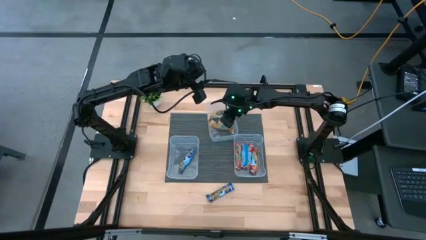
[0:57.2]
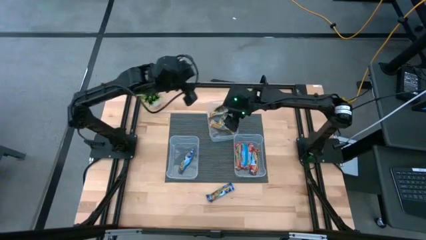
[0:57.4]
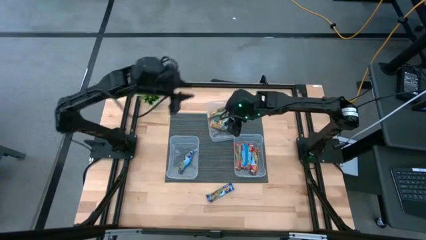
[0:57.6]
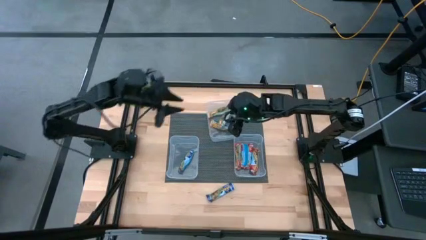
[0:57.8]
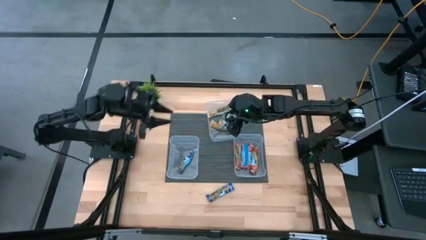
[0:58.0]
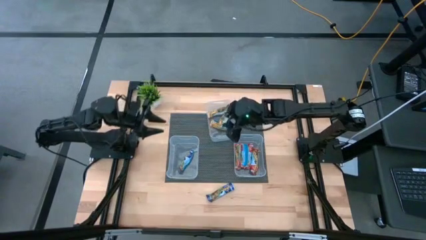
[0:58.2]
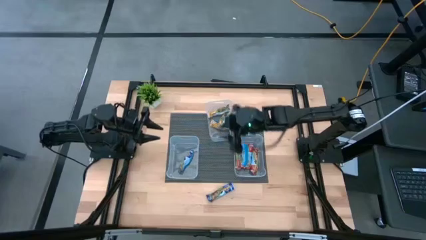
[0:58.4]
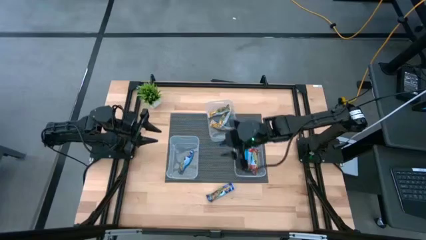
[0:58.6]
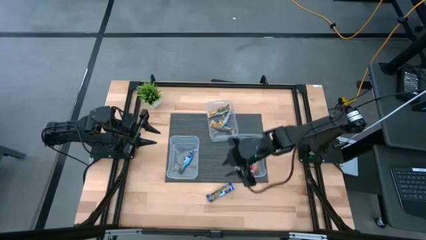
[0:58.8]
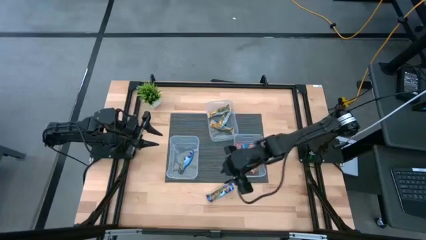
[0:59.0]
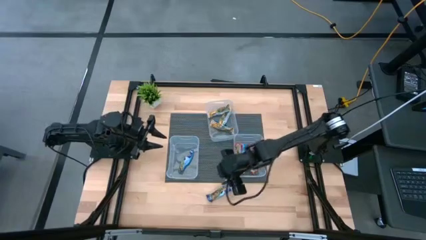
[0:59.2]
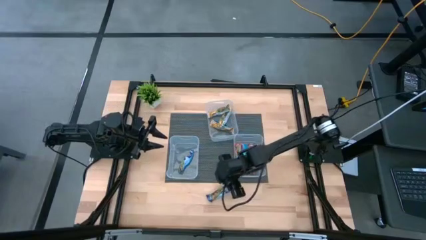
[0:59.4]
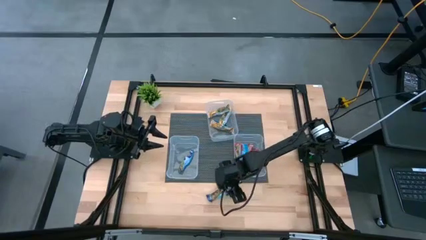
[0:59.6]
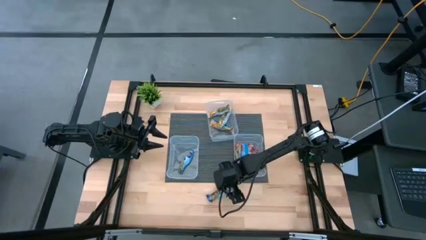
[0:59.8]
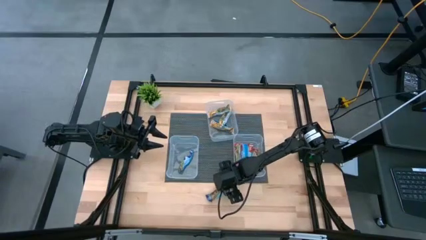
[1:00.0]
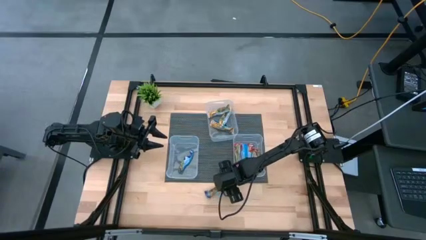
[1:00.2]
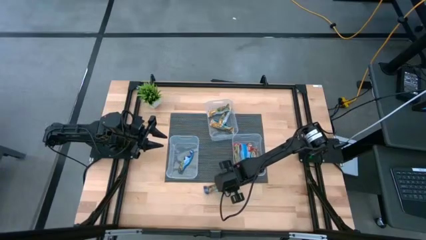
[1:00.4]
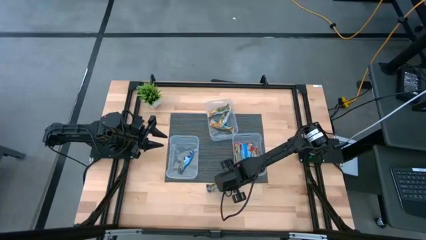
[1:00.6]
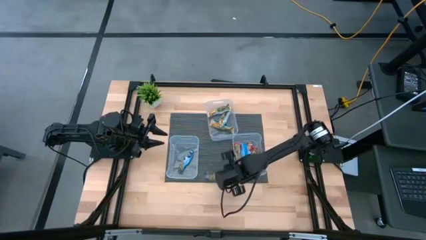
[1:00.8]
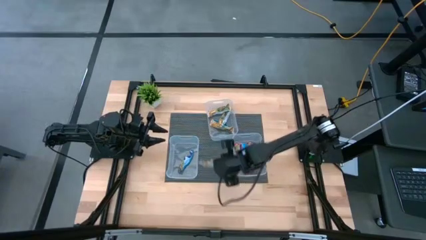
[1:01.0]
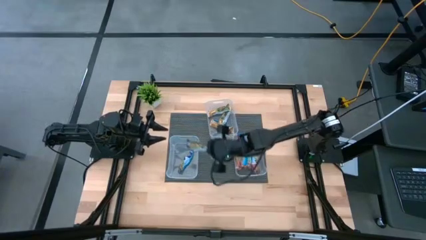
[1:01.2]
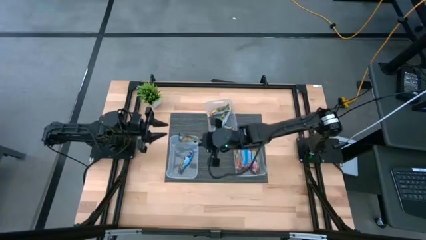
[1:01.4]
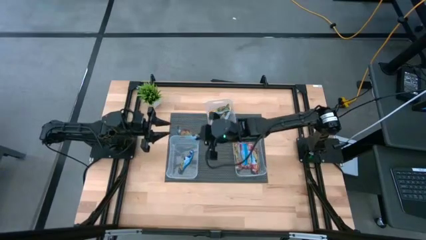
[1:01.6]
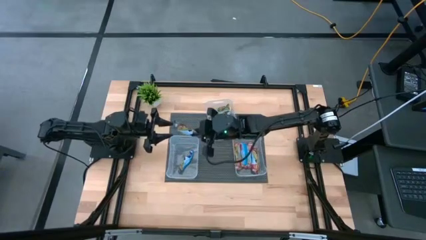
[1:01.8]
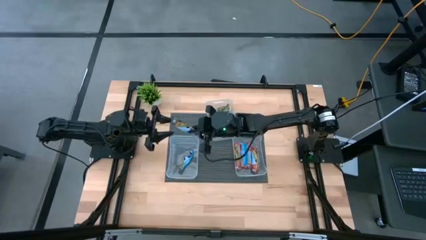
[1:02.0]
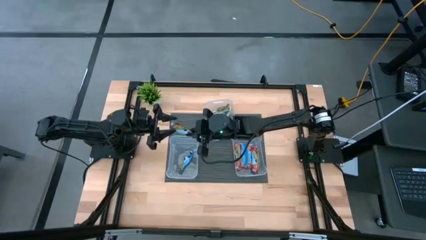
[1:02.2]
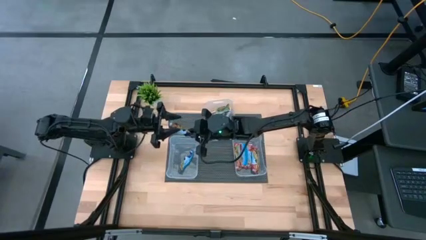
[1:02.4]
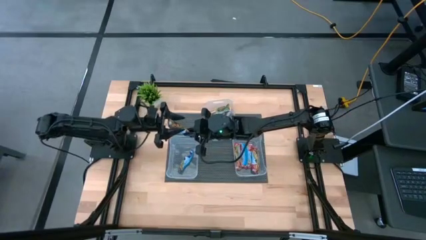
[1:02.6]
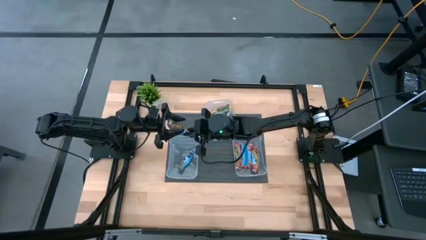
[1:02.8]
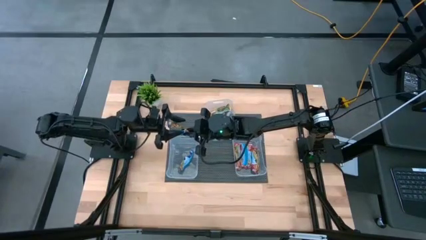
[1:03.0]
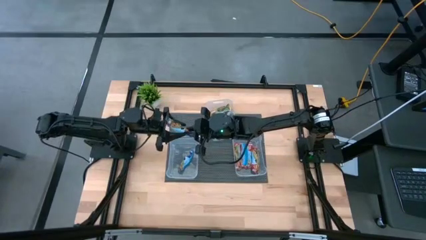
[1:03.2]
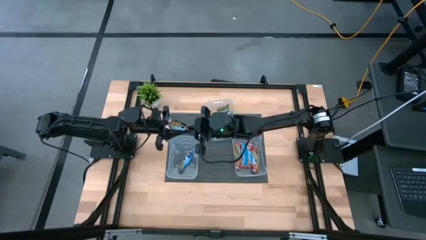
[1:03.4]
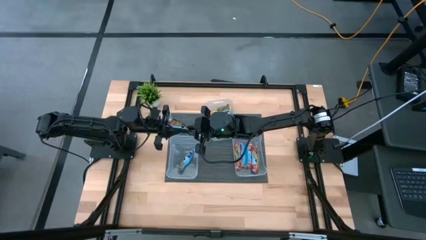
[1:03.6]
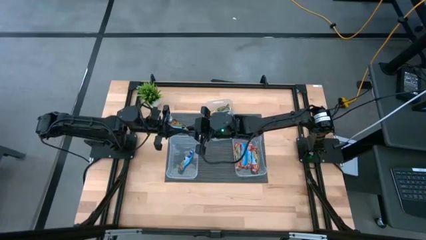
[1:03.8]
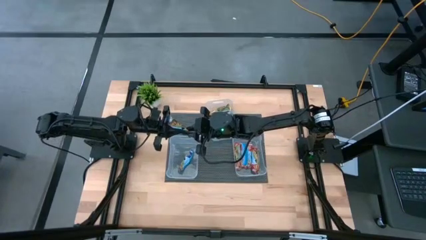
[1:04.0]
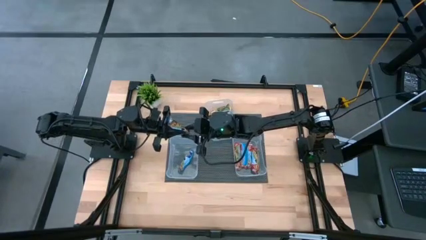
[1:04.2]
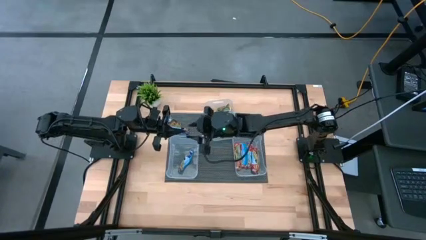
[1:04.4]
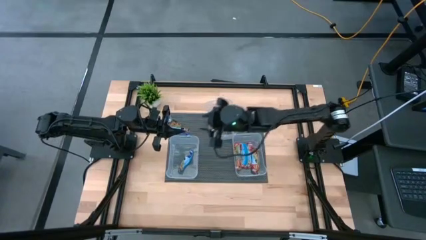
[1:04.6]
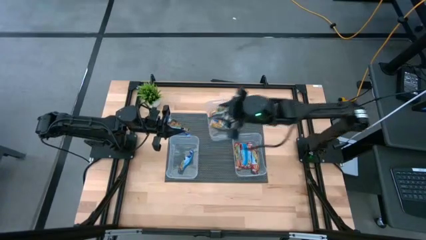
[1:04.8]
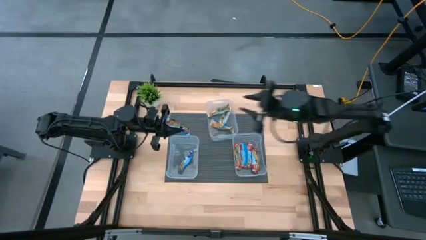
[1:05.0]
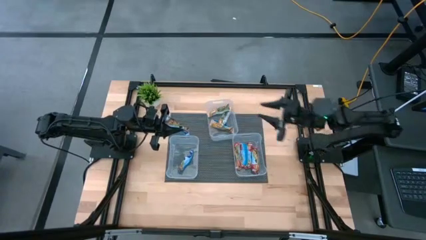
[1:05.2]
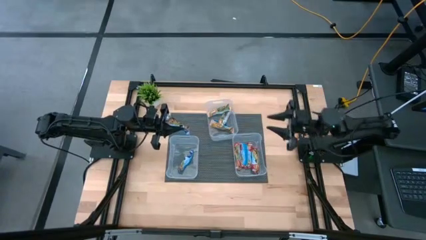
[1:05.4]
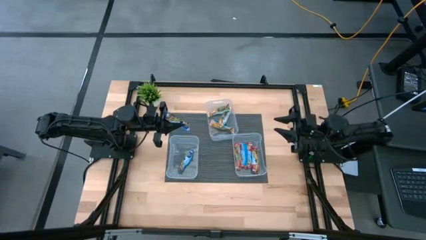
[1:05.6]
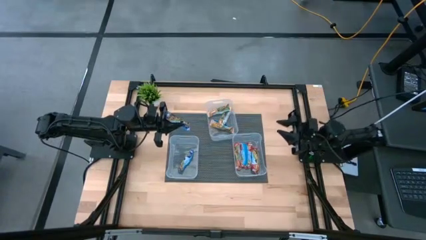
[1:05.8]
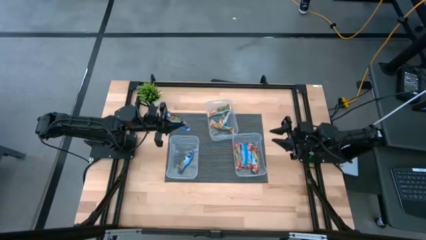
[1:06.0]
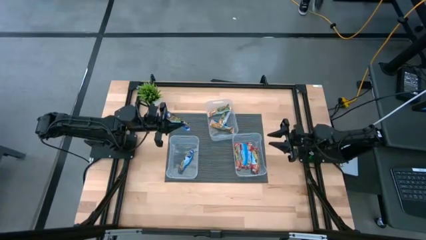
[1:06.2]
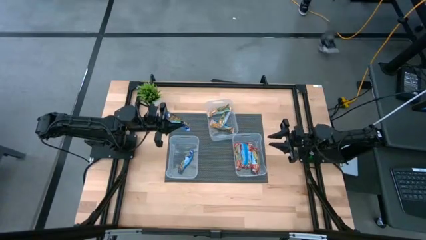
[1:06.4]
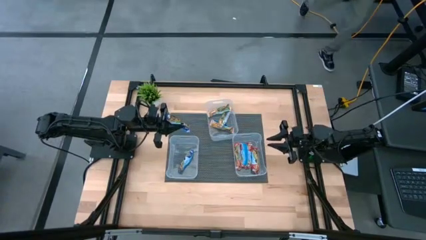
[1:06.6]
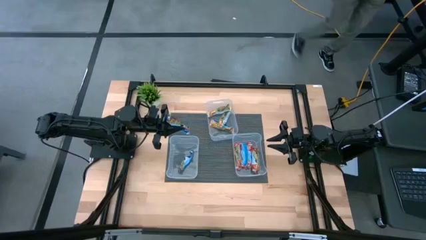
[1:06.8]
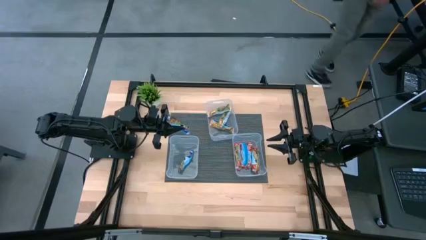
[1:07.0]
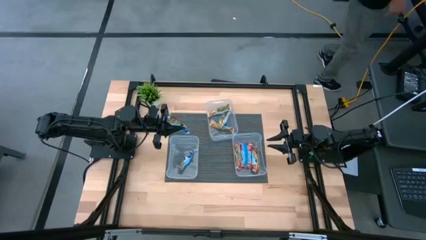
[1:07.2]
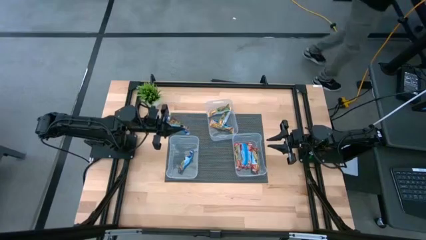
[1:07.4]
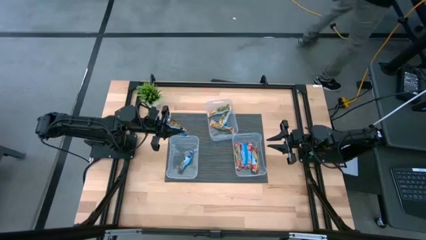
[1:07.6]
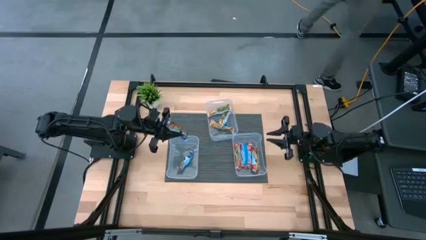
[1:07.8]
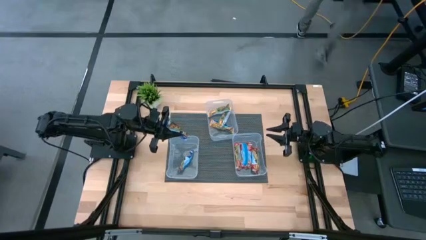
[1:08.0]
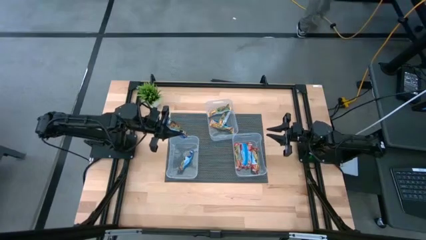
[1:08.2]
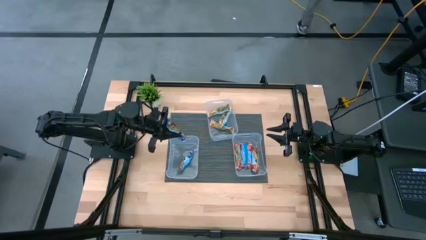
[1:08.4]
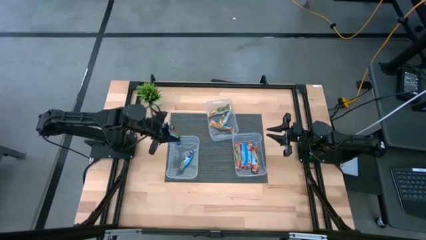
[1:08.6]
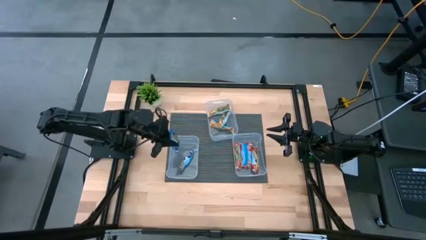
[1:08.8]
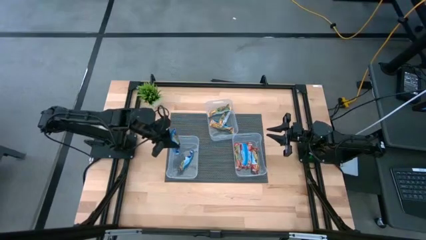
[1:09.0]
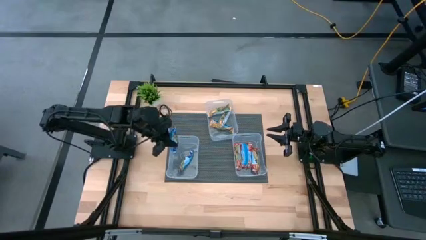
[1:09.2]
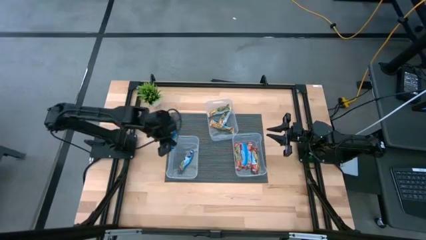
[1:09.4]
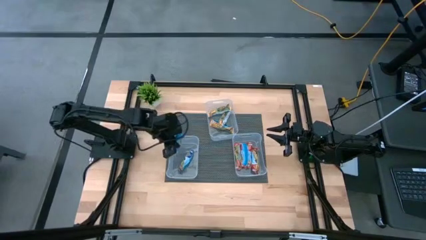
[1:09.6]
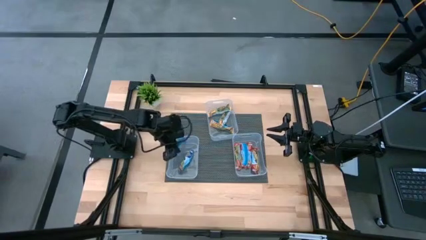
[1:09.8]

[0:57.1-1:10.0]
Task: Pick and place Granola Bars by type
Put the blue granola bar into the bottom left transparent bin

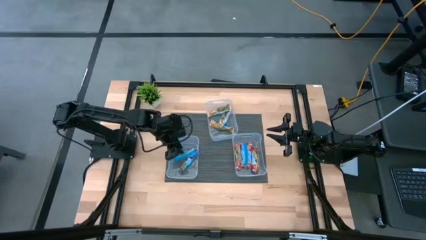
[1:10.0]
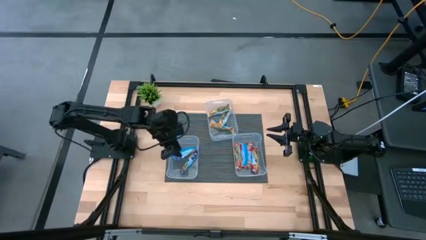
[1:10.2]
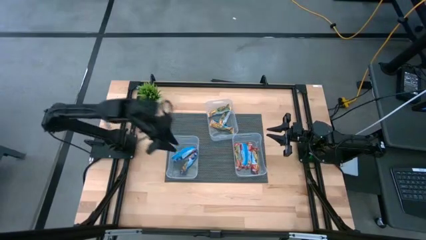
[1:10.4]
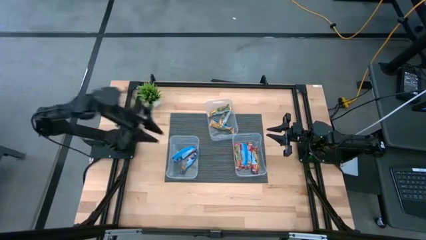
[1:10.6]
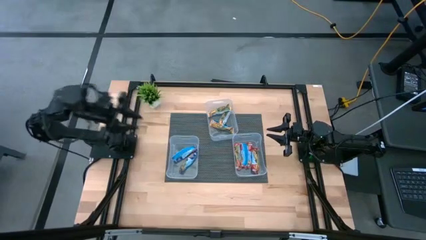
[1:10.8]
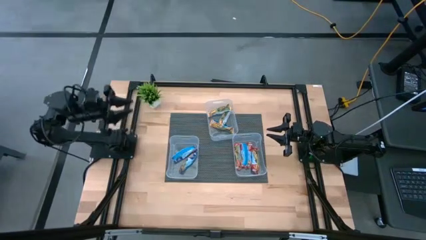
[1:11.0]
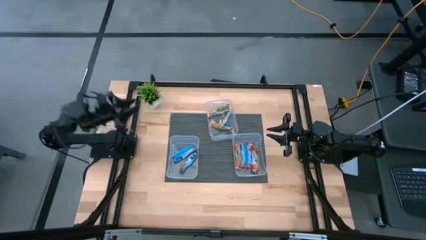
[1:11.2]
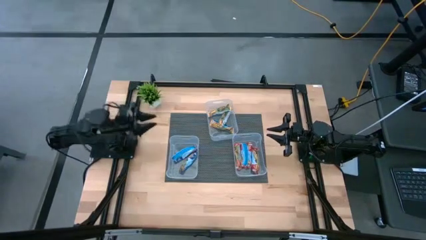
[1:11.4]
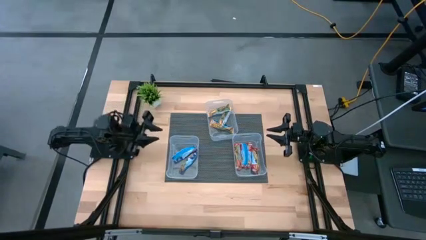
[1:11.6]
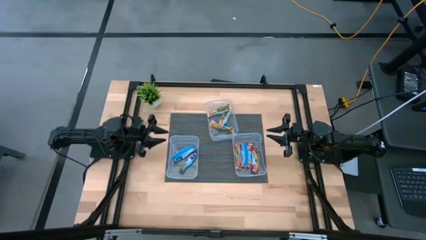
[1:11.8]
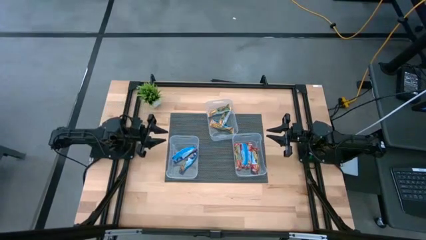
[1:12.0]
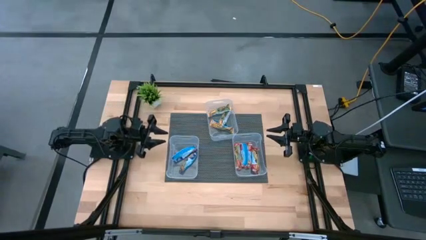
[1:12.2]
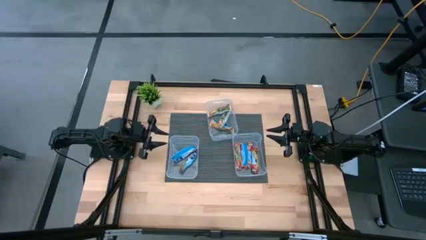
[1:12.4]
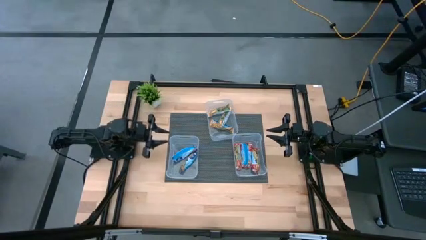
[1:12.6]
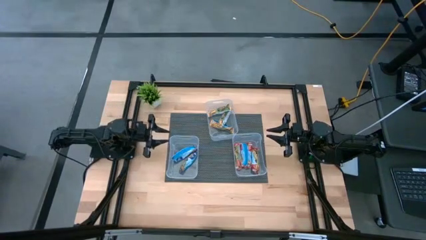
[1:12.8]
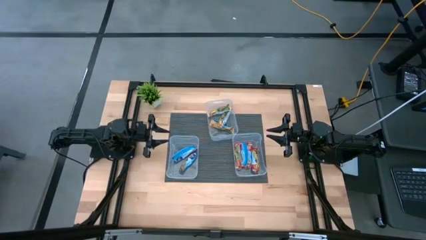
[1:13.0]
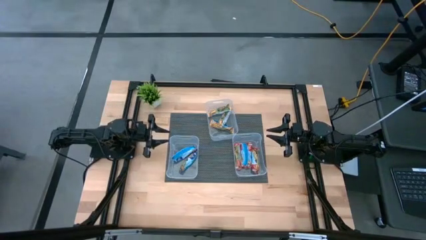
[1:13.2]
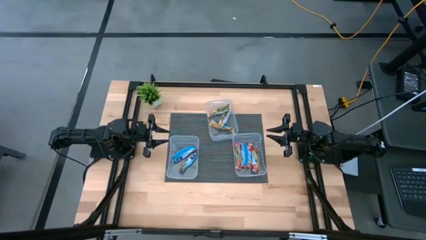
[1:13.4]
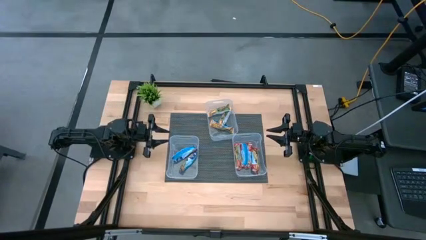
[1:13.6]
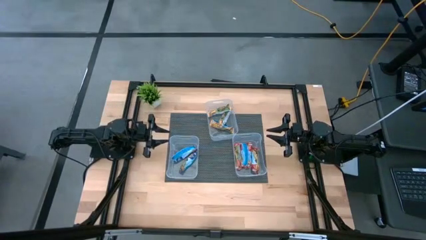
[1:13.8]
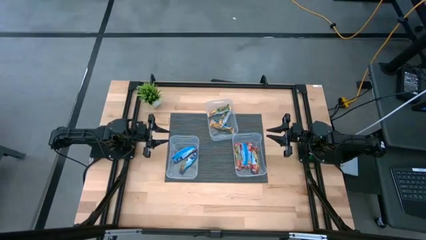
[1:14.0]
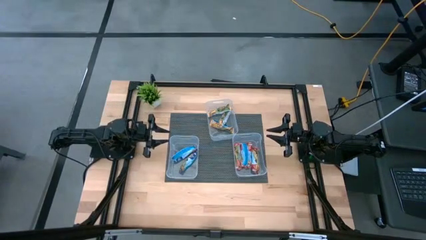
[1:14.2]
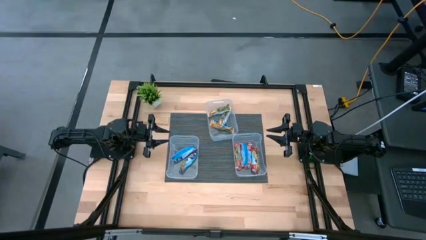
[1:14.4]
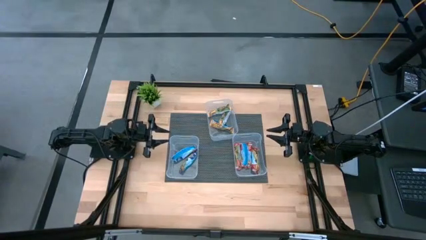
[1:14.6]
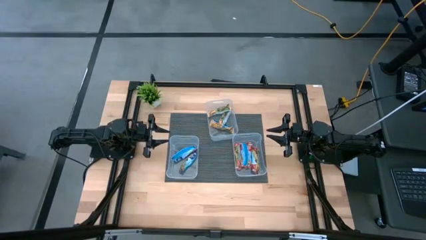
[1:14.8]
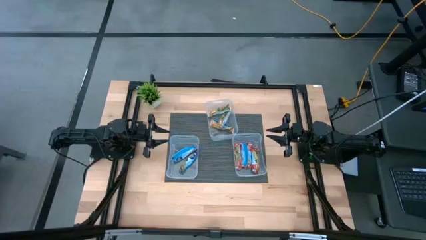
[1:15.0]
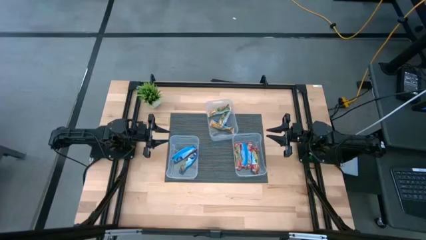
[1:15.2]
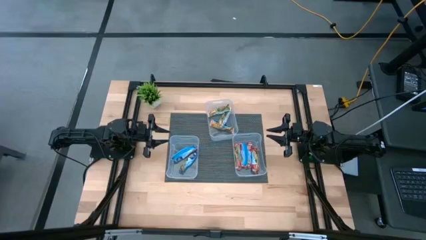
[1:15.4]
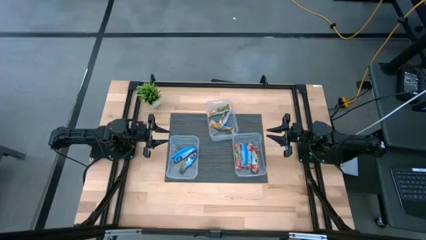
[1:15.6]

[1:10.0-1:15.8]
Return to Home Position
